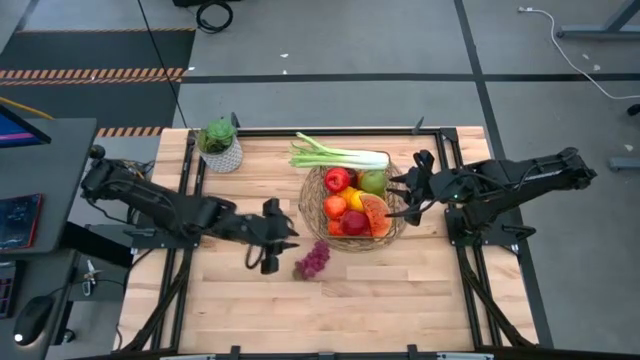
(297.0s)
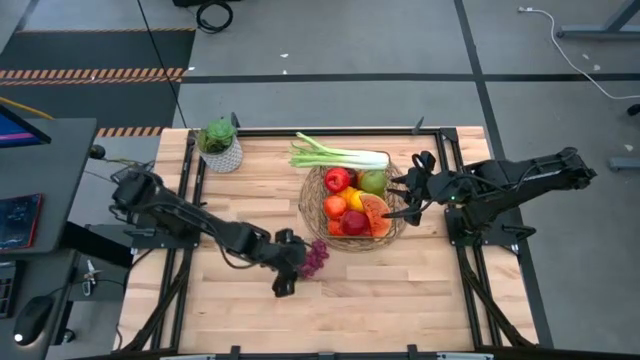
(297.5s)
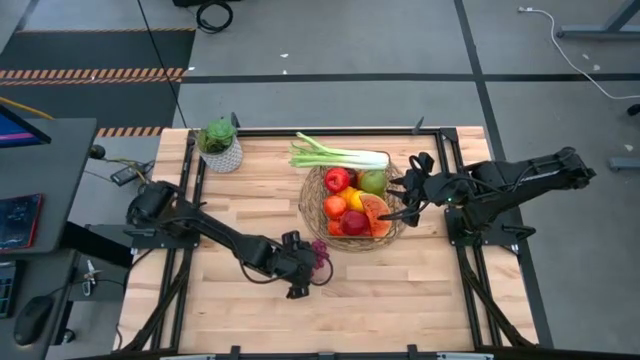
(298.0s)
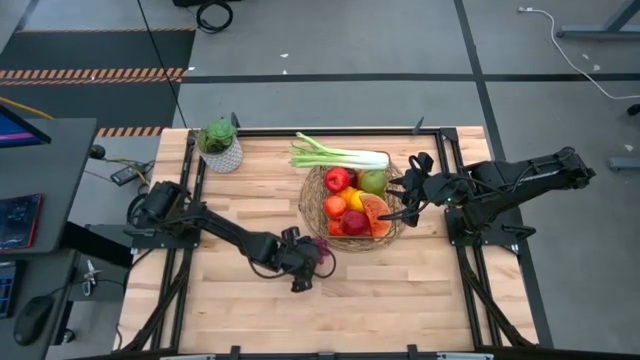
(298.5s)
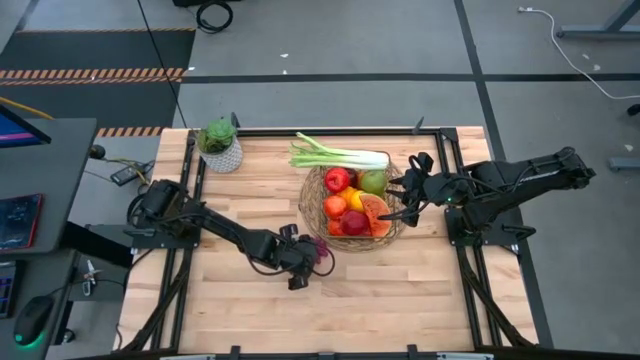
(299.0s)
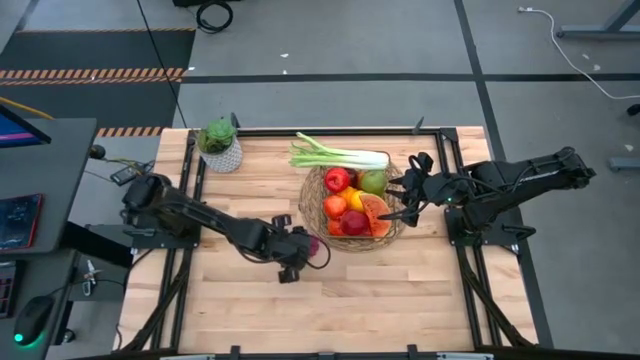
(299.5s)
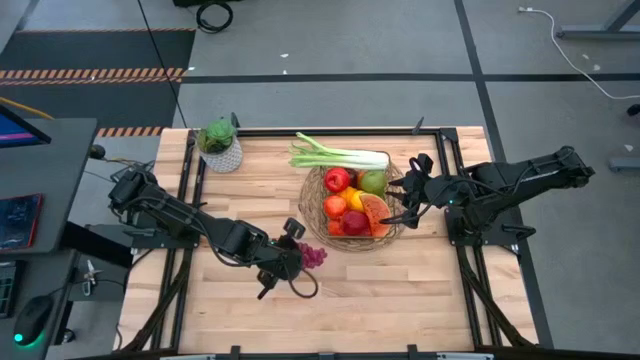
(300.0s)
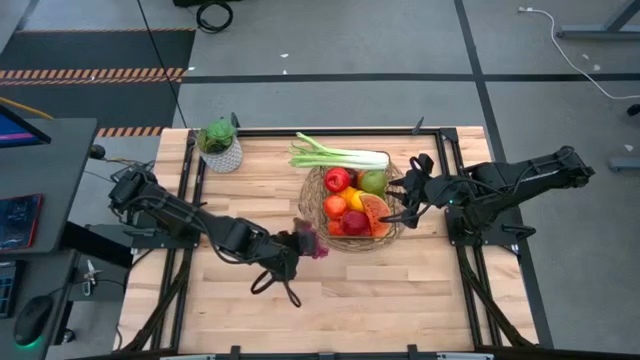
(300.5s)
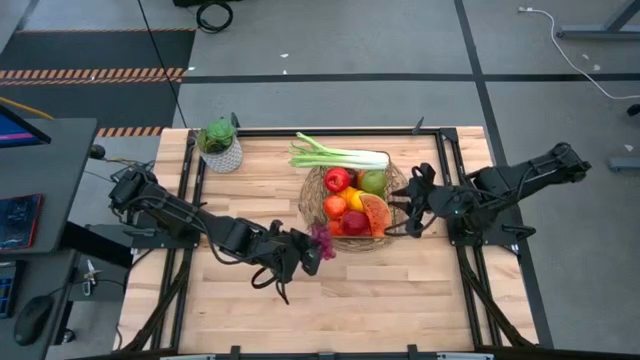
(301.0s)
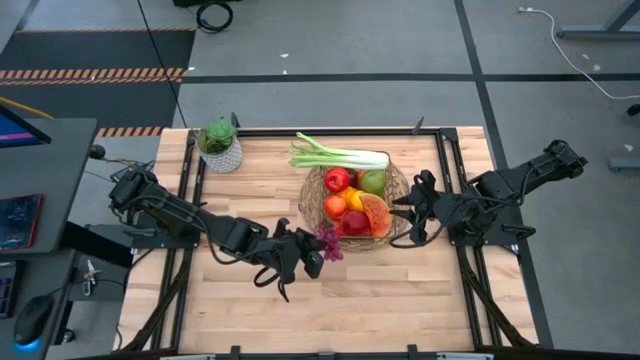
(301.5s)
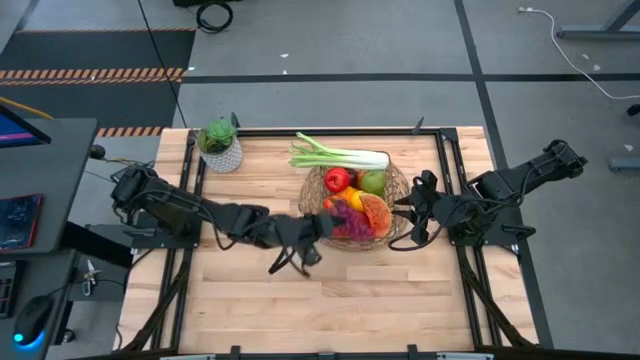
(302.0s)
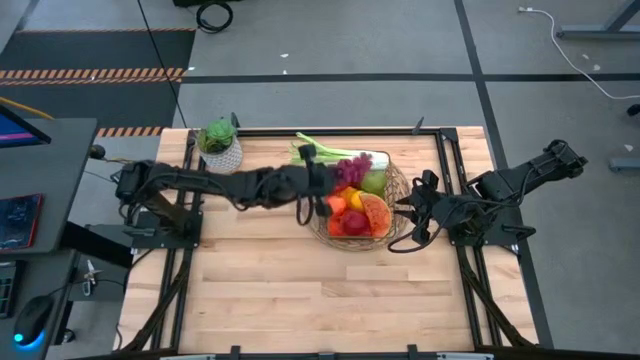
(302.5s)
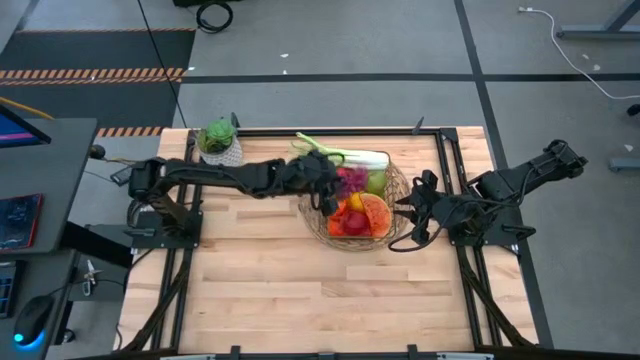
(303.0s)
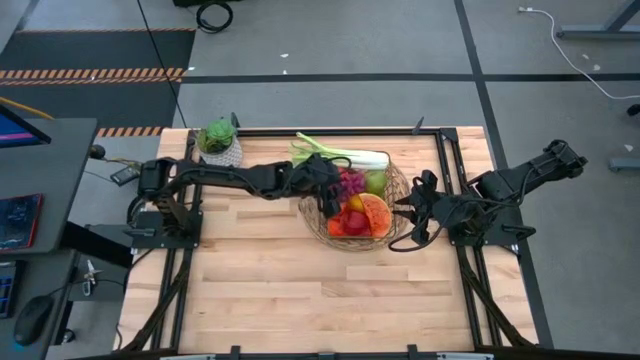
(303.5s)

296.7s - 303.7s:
Task: Build produce basket
Put the purple grapes into the brown wire basket

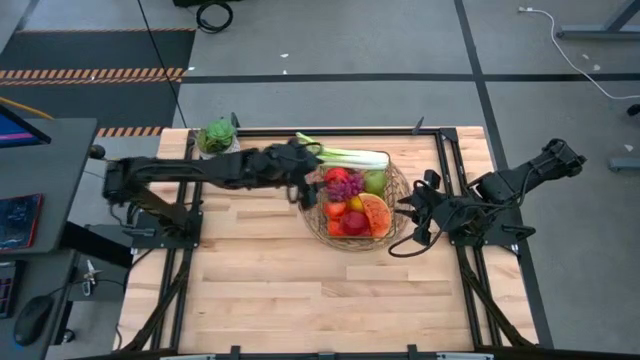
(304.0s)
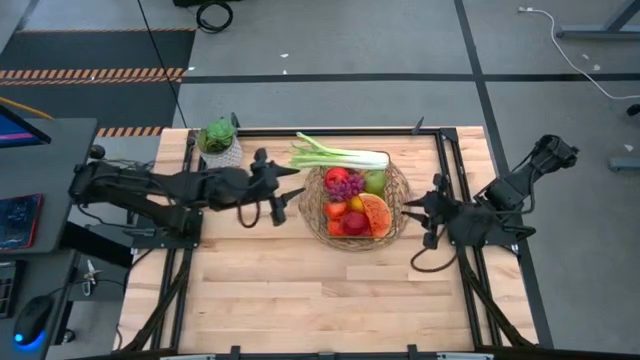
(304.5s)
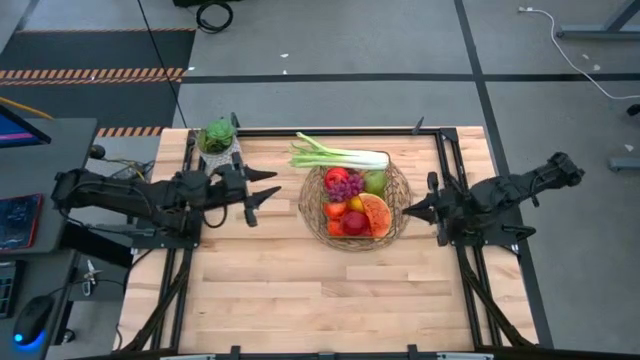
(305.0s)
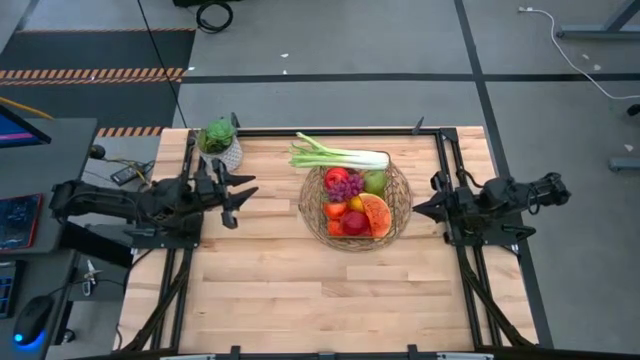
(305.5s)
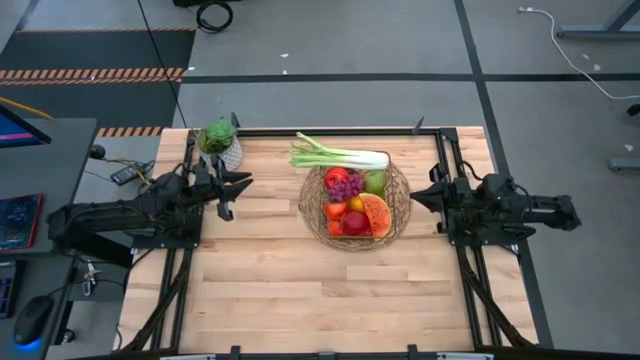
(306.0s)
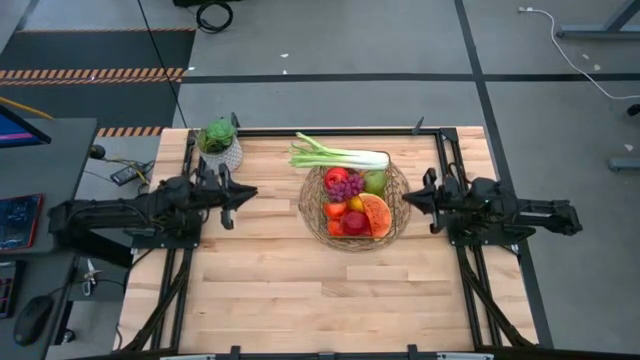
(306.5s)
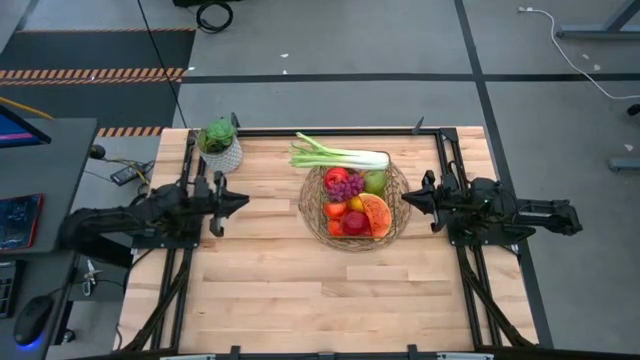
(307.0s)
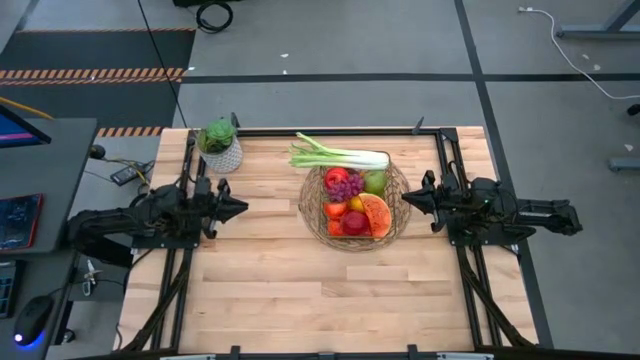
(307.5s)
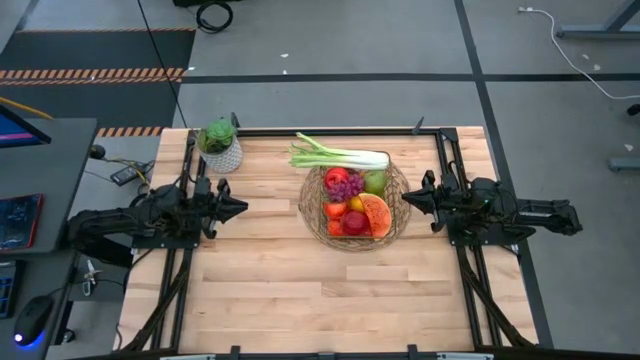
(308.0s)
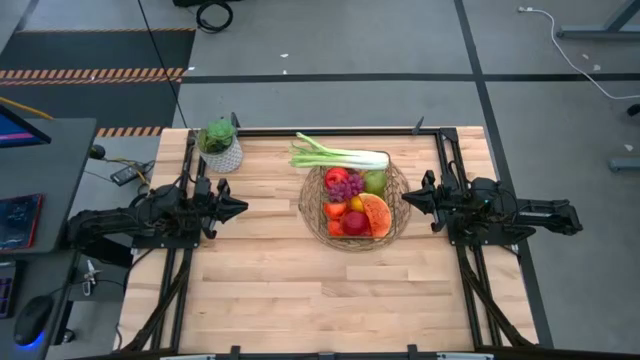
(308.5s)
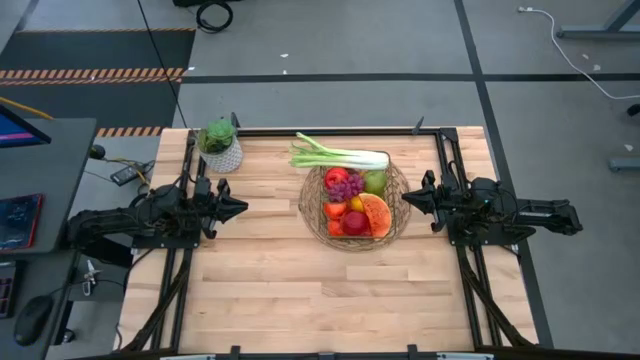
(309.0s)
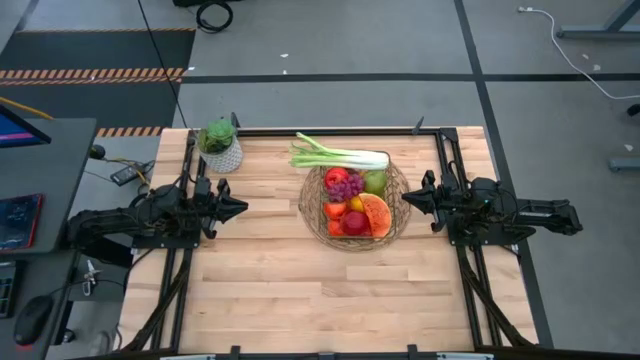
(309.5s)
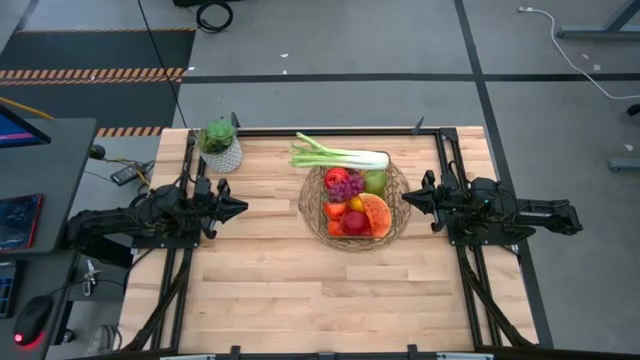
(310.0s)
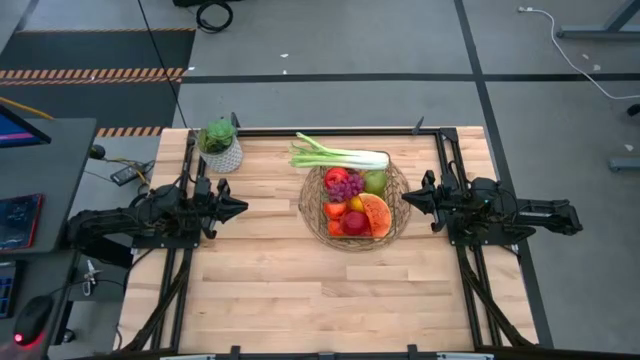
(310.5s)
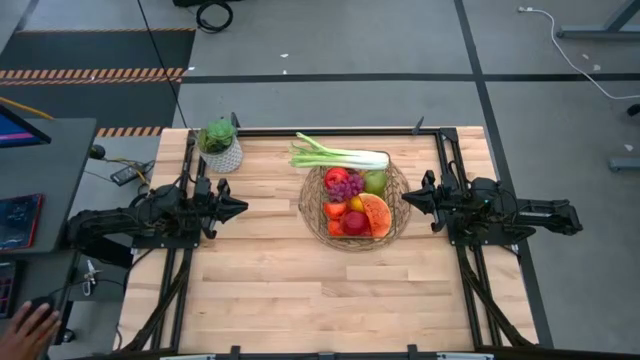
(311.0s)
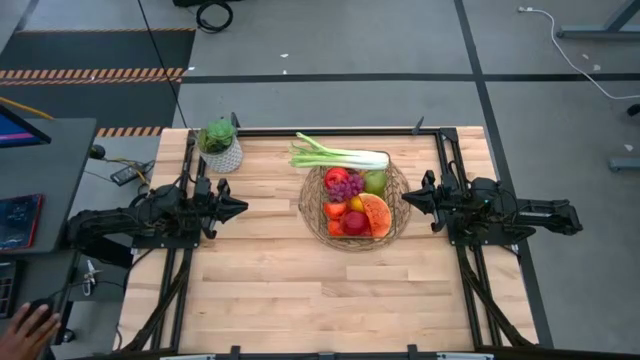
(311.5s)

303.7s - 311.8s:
Return to Home Position

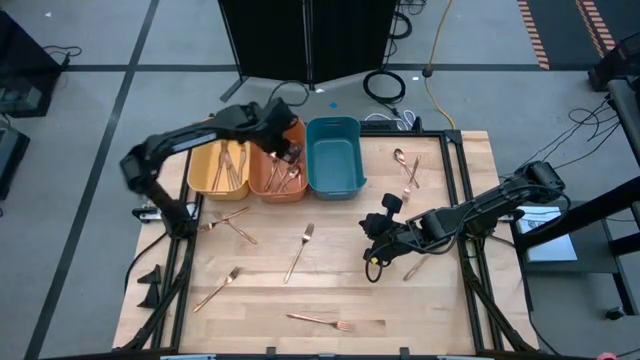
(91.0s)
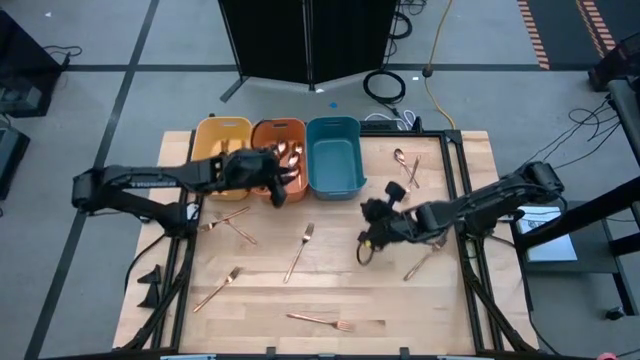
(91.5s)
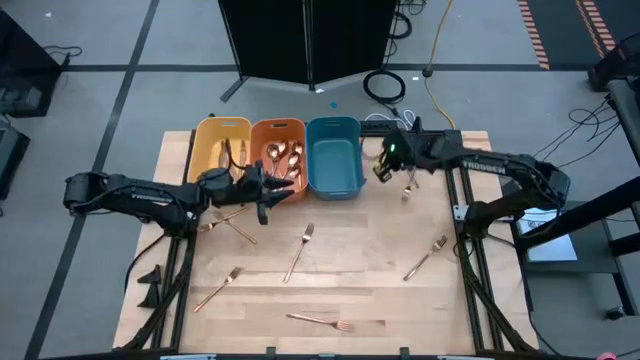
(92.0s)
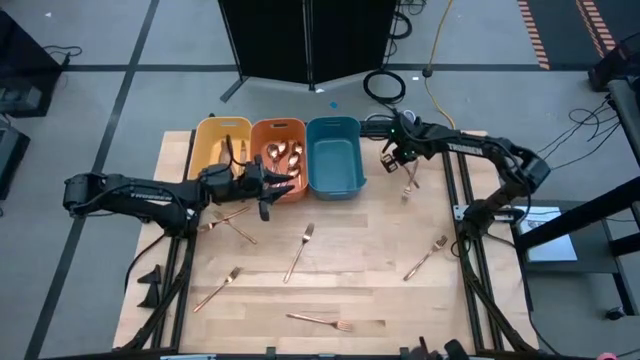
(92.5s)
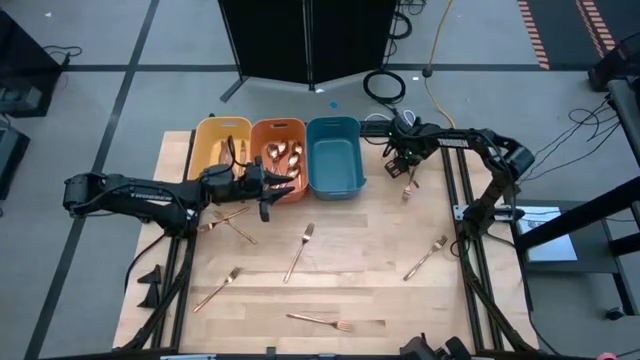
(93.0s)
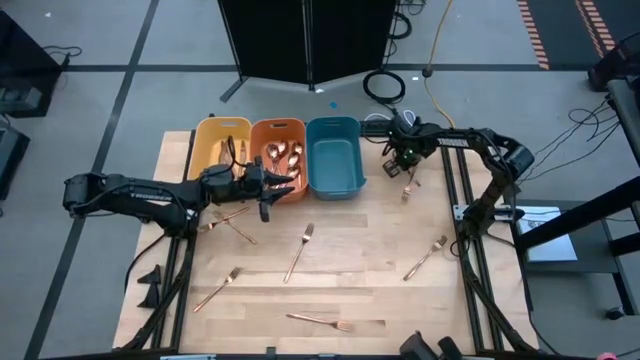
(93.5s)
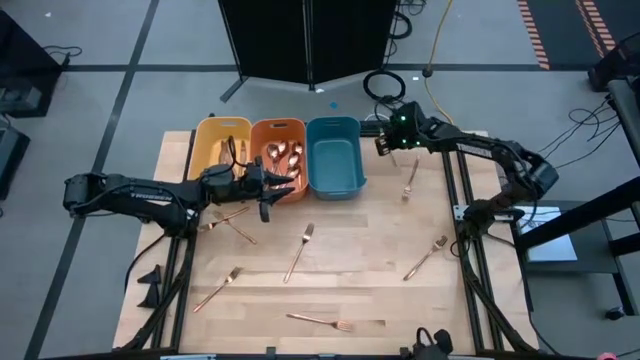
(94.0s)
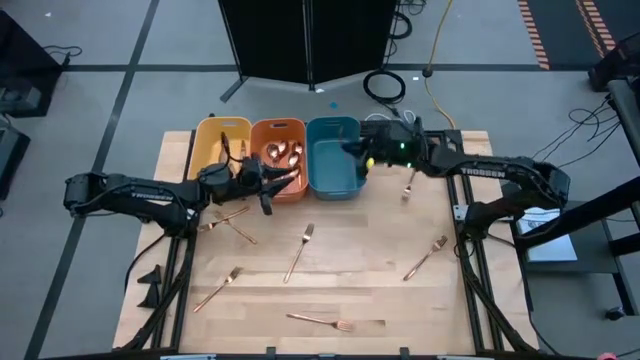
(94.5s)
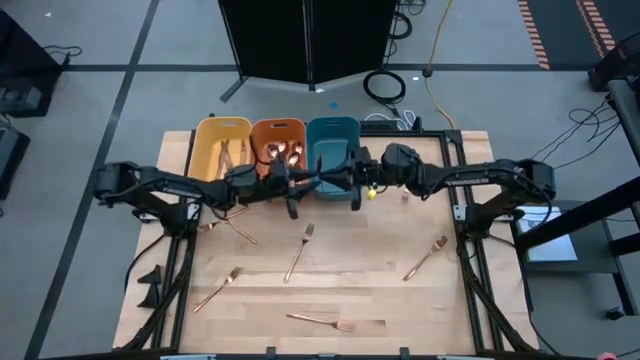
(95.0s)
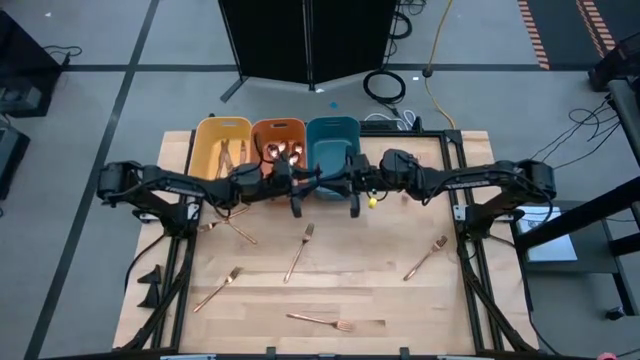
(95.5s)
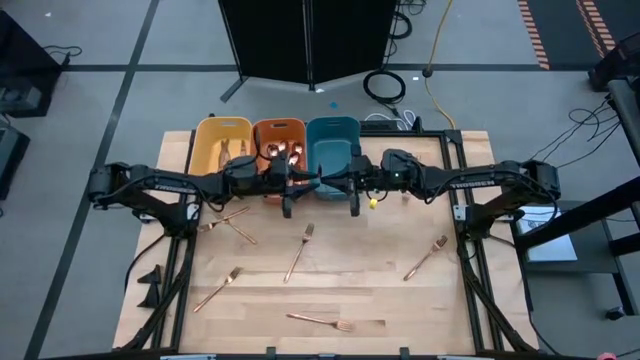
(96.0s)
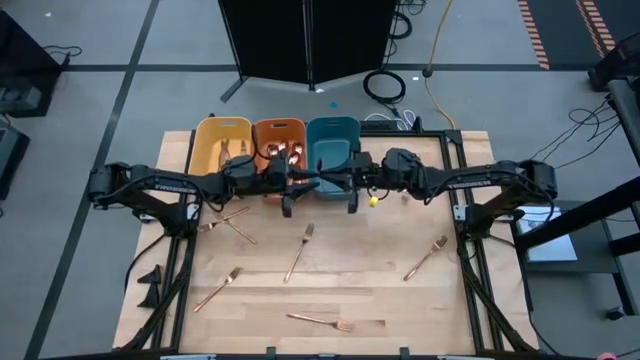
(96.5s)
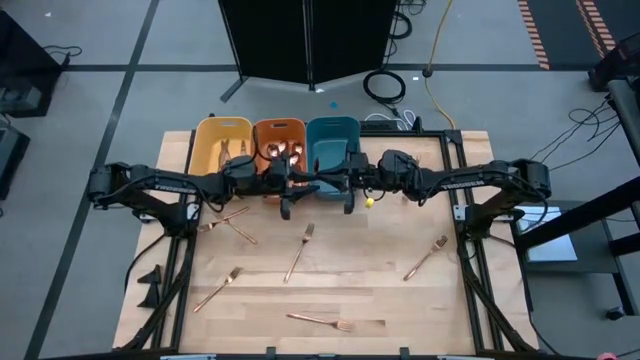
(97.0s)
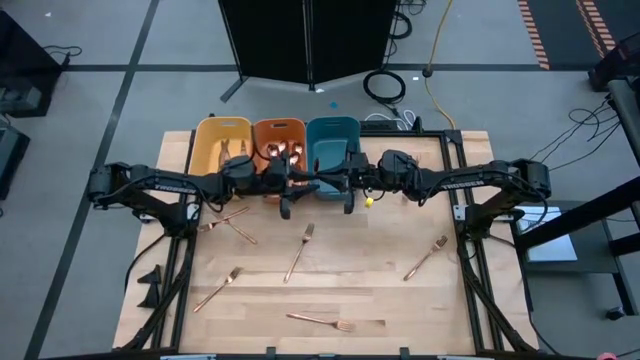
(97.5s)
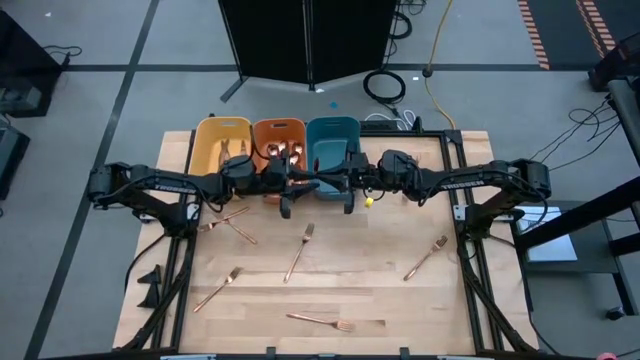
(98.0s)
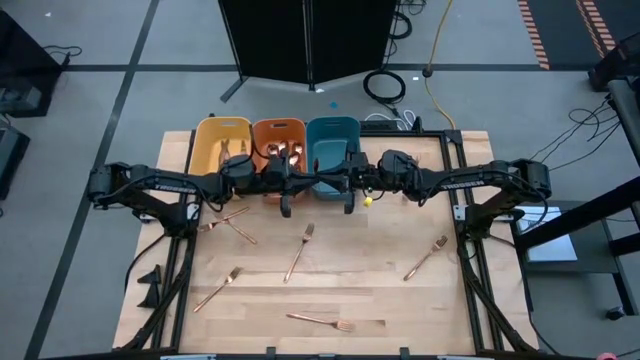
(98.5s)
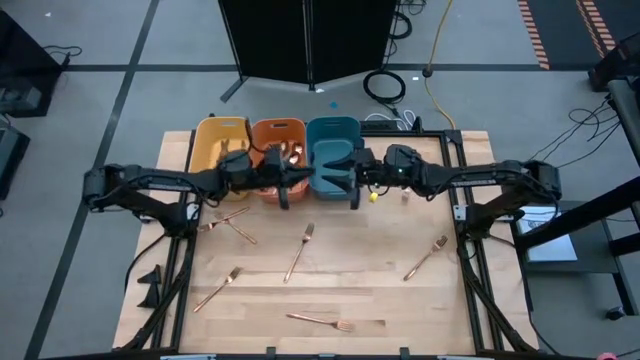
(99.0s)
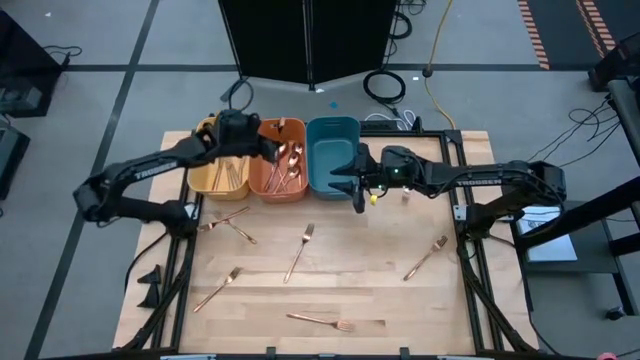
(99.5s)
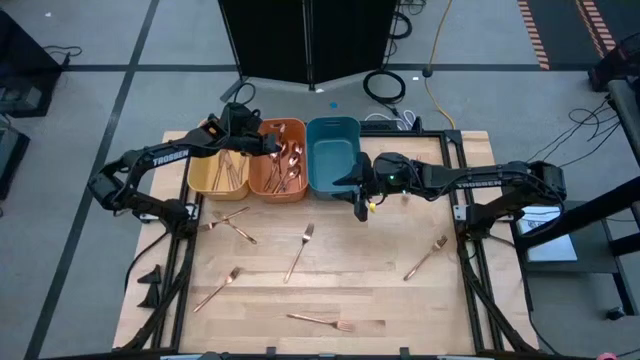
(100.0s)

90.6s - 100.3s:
Task: Sort silverware
Put the gold spoon into the orange bin
